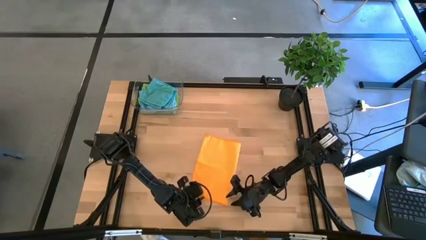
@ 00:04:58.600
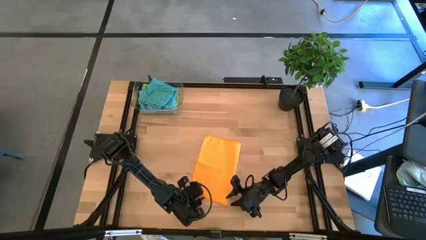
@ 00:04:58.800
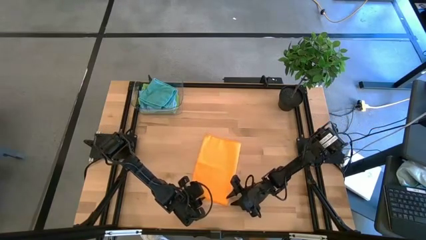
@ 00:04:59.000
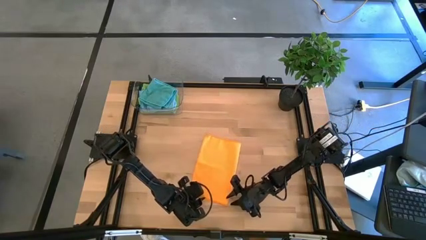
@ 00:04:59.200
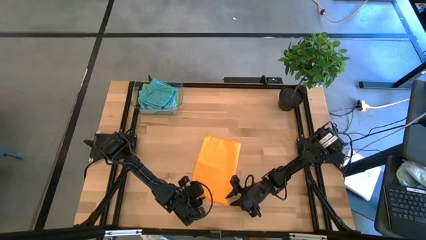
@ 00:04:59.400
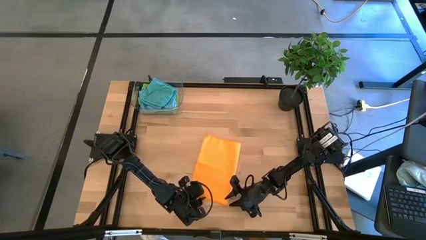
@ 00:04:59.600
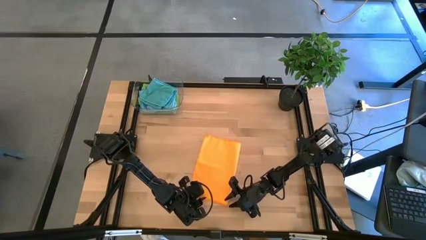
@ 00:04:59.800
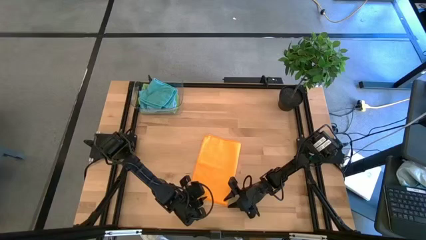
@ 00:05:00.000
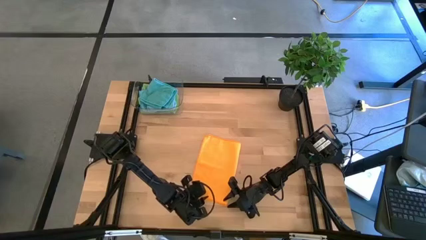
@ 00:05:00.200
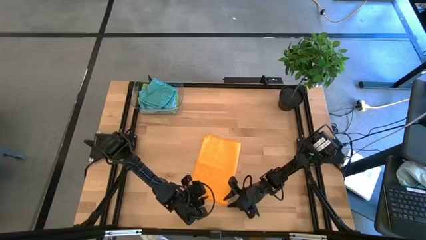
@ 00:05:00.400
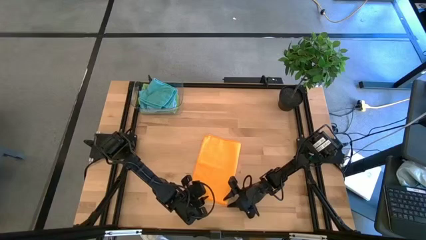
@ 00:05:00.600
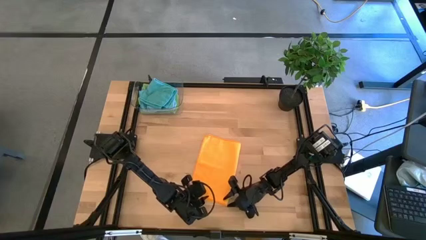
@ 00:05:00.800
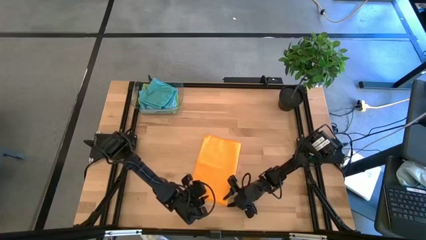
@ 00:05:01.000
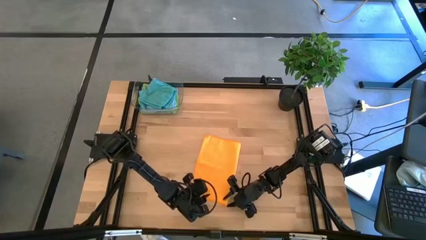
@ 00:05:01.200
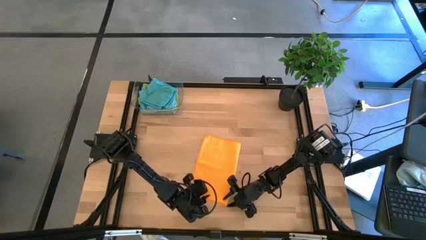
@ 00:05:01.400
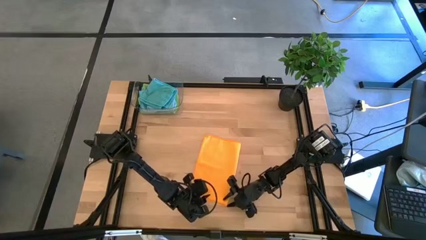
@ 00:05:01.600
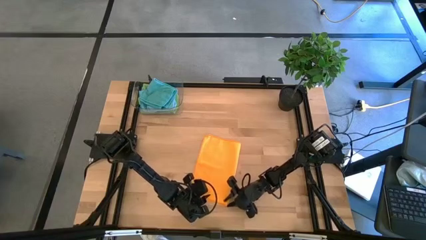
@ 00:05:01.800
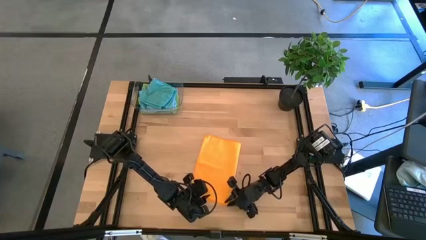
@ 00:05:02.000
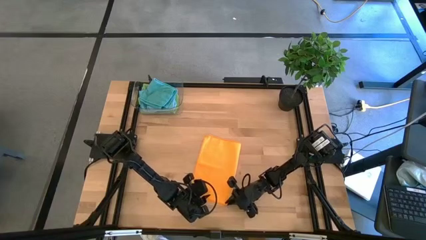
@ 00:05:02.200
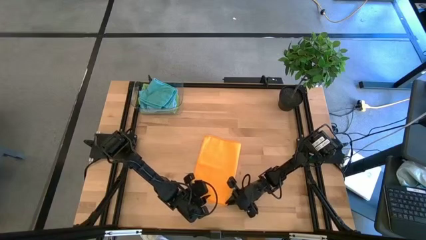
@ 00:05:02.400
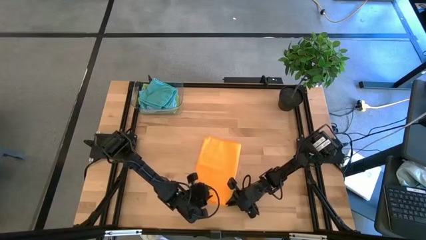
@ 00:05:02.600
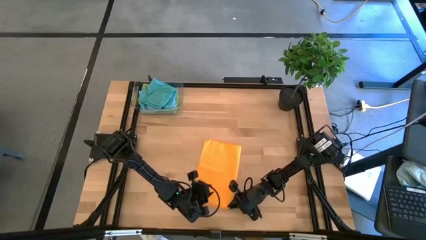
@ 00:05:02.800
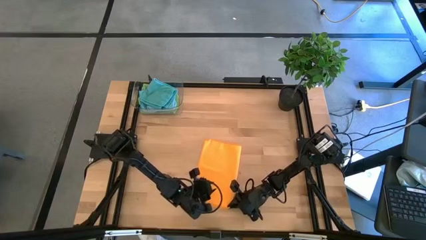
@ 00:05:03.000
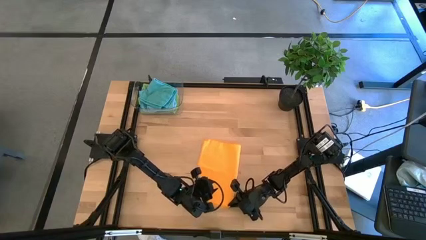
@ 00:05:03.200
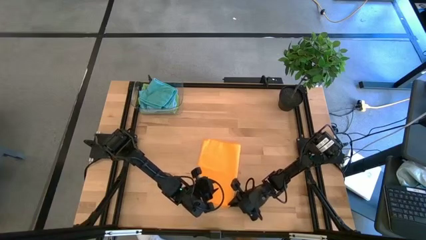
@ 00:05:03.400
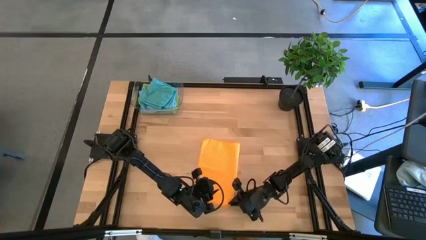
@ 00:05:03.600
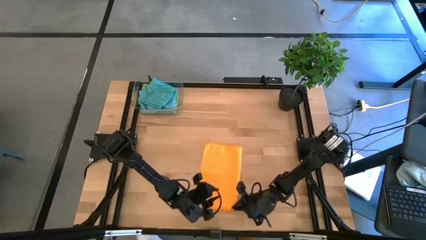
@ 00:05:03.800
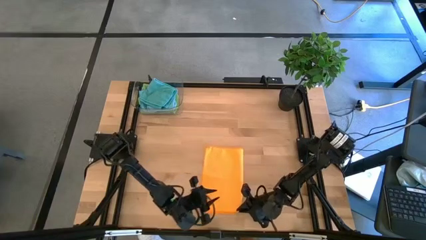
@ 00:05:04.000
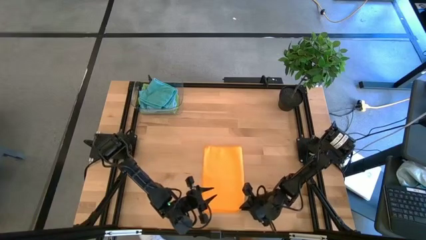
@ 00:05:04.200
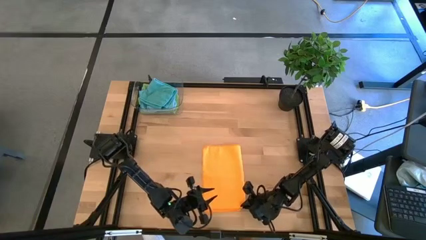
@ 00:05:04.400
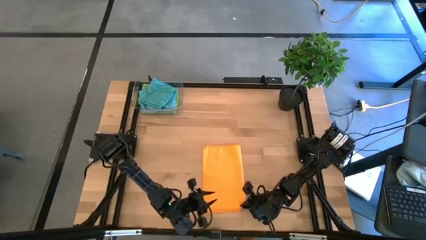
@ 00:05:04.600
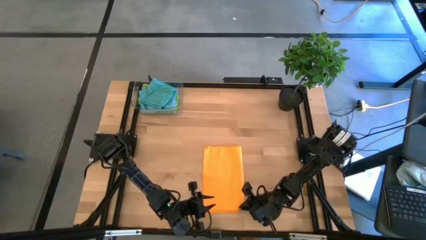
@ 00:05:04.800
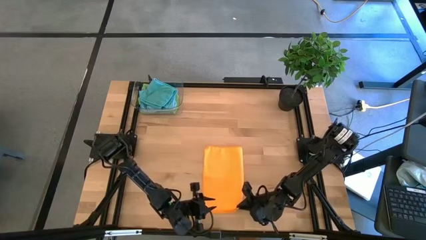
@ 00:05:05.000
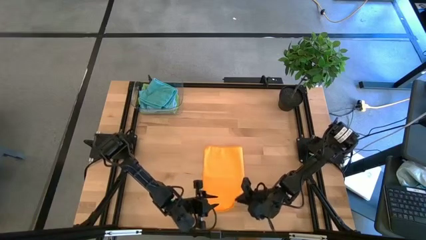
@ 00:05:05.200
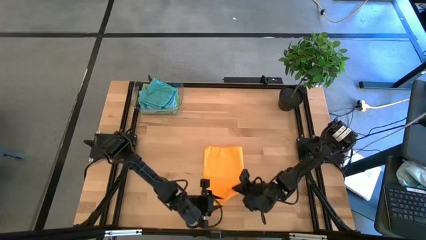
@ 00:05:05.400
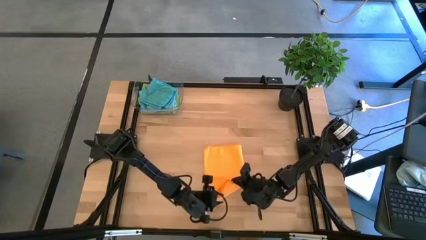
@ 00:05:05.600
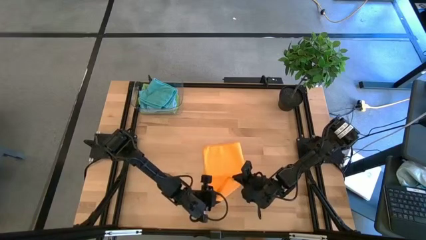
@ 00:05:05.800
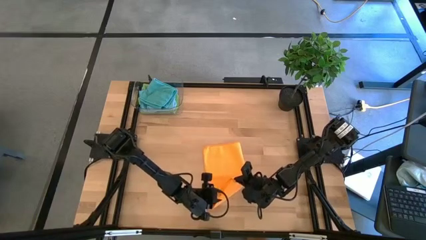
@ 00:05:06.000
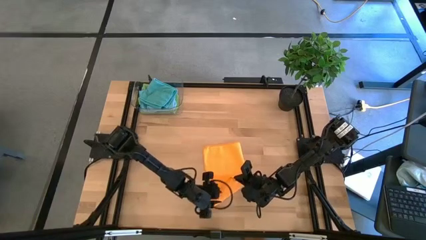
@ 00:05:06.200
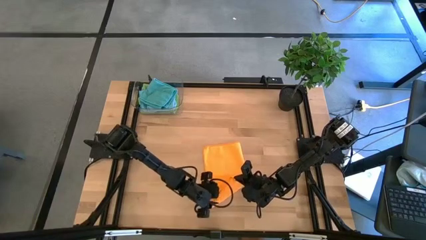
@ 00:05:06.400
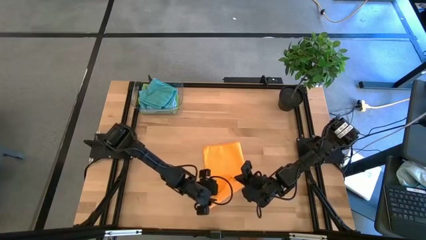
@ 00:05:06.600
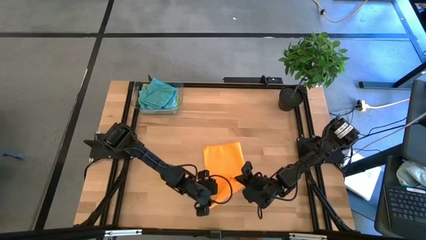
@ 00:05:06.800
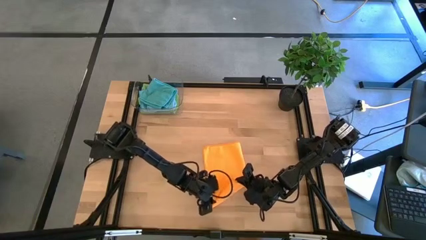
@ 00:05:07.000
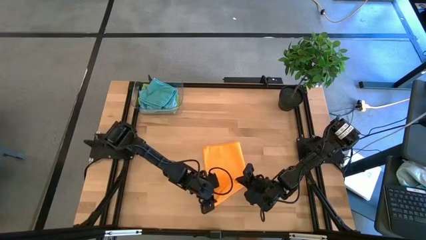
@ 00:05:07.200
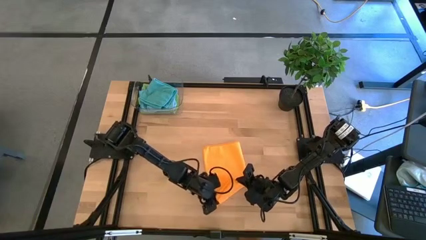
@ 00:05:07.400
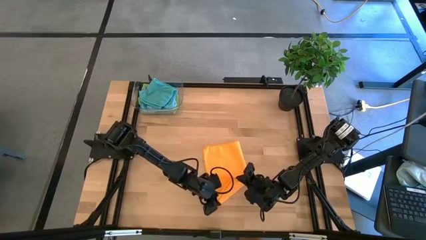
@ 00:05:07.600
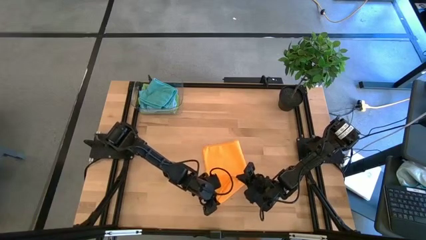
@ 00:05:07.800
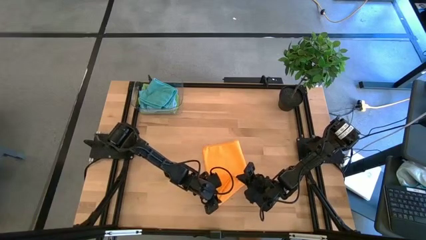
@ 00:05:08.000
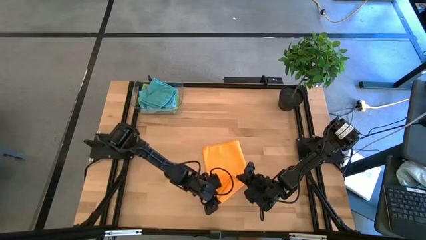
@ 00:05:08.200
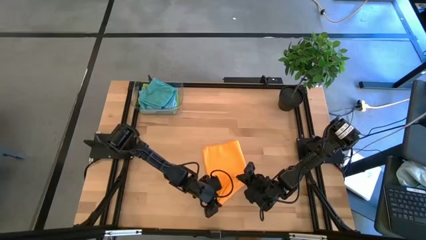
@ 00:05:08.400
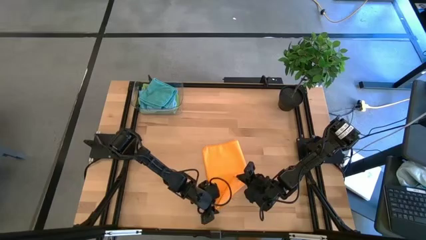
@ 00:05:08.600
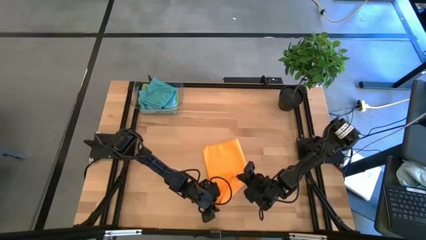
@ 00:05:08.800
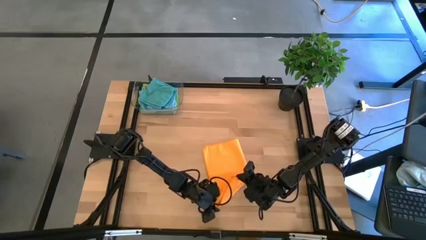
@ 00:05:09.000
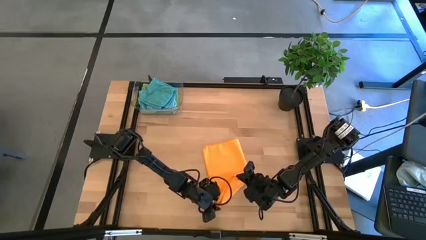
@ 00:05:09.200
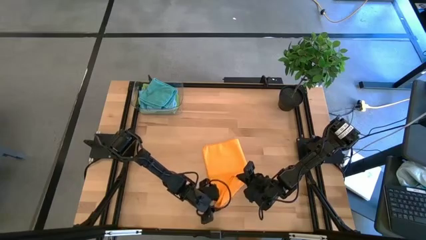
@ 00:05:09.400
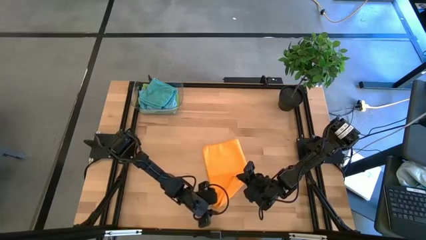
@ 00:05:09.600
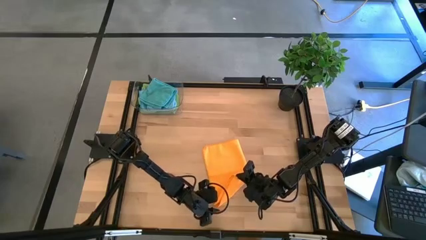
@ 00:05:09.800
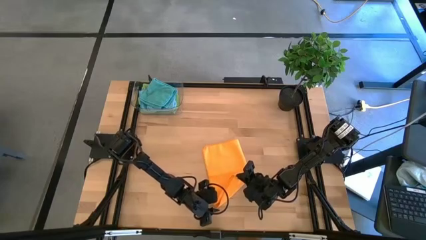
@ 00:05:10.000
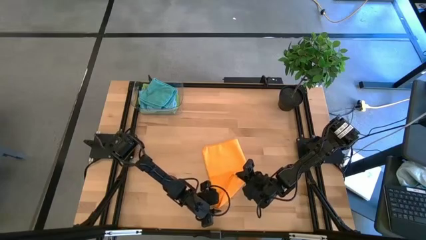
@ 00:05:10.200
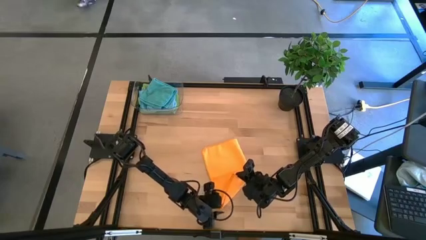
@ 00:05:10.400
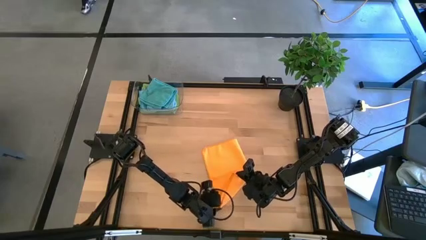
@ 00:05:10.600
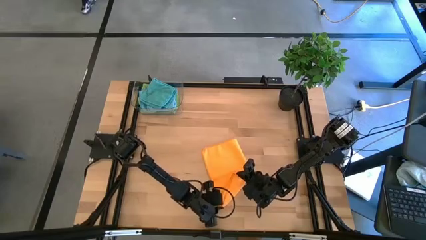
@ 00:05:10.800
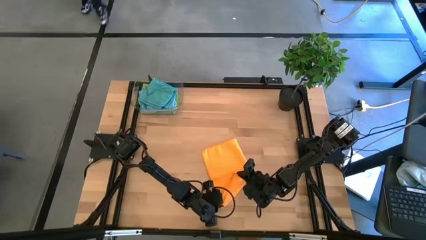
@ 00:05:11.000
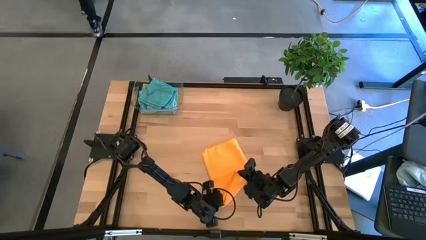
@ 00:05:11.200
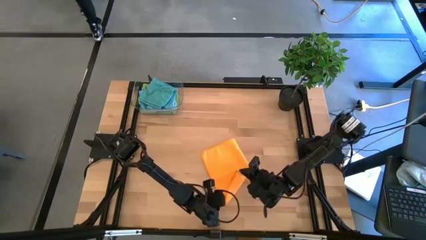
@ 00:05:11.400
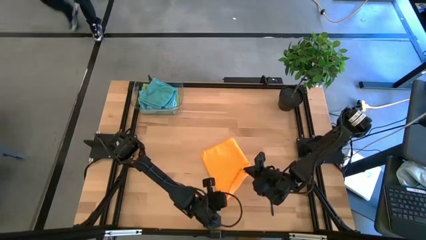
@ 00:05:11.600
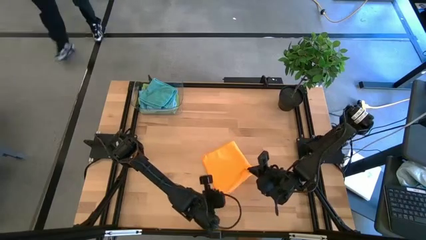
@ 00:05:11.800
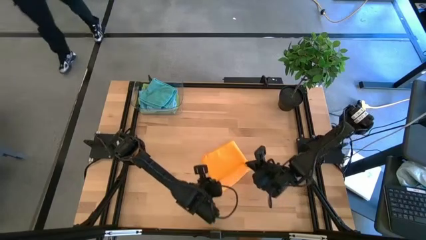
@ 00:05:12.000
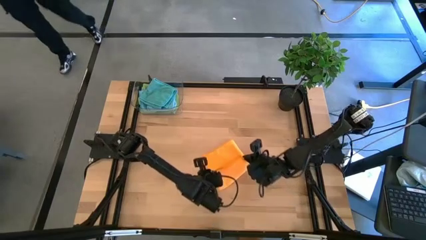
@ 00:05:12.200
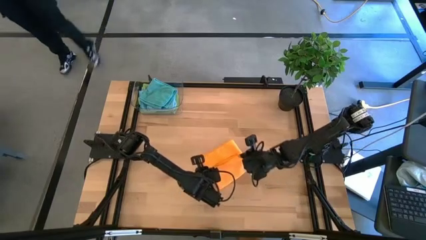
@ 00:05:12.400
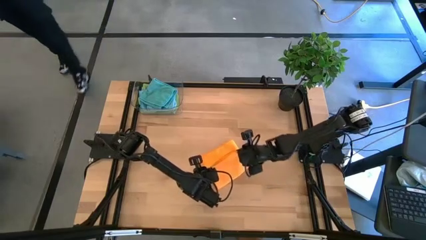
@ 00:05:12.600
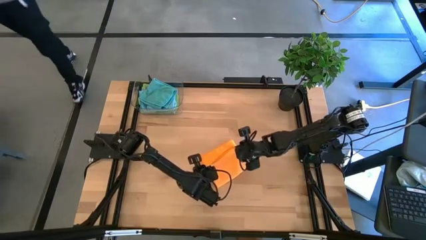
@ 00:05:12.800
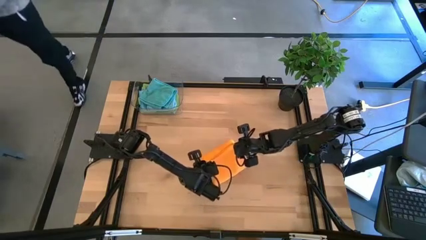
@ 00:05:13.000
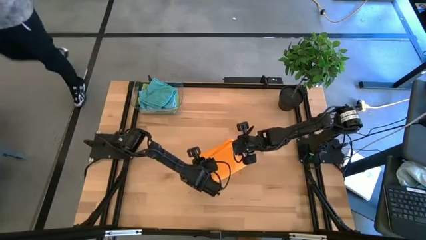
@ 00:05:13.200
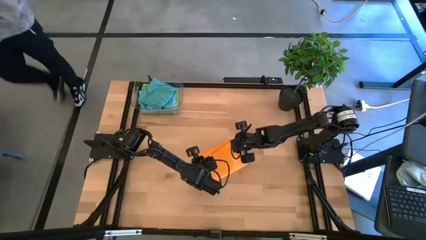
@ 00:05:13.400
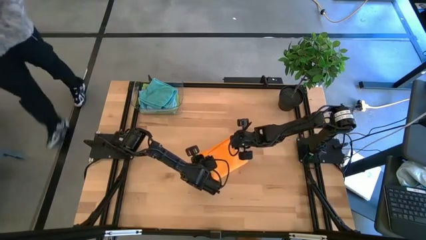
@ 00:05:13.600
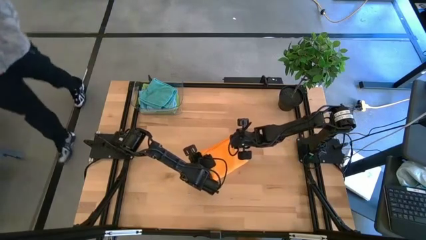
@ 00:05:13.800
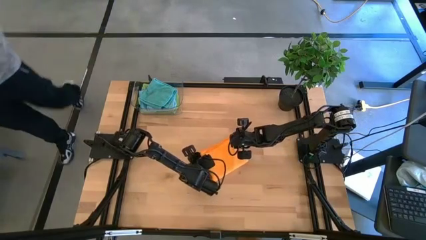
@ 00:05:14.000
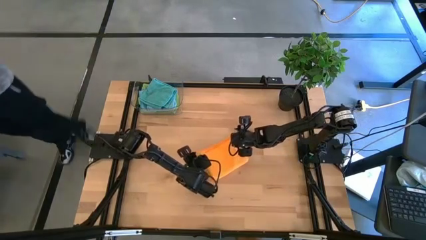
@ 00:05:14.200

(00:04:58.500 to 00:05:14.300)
Task: Fold microfiber towels
Fold the orange microfiber cloth
